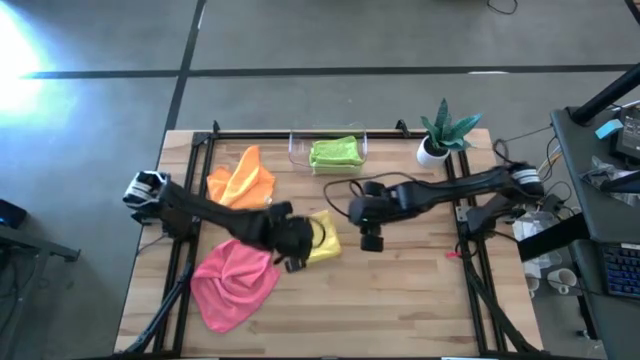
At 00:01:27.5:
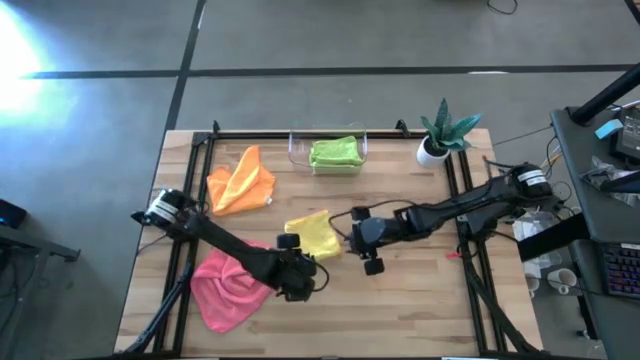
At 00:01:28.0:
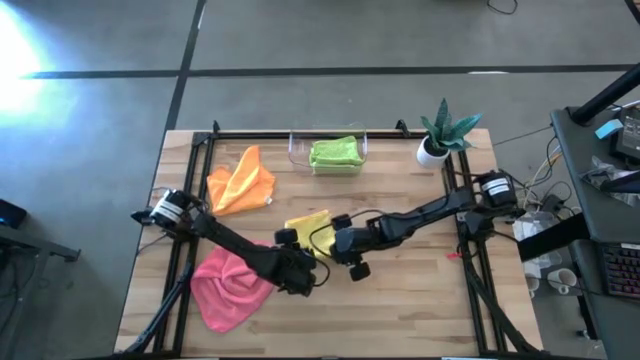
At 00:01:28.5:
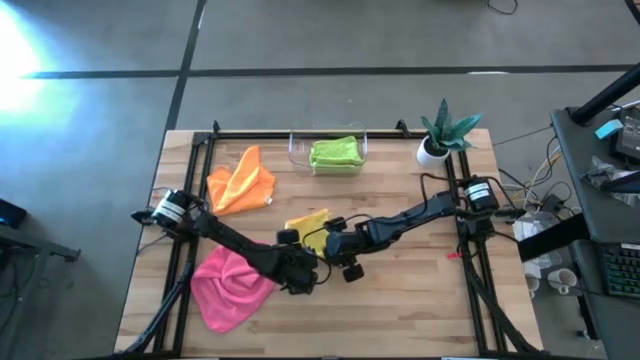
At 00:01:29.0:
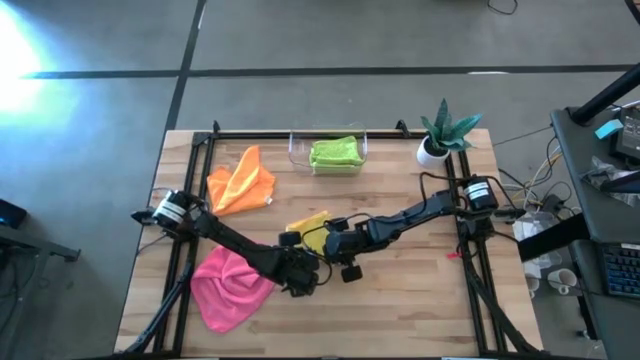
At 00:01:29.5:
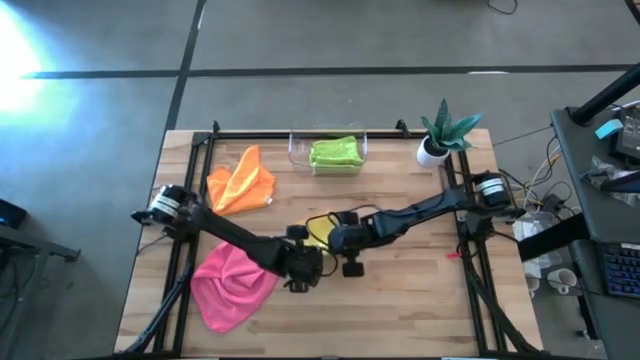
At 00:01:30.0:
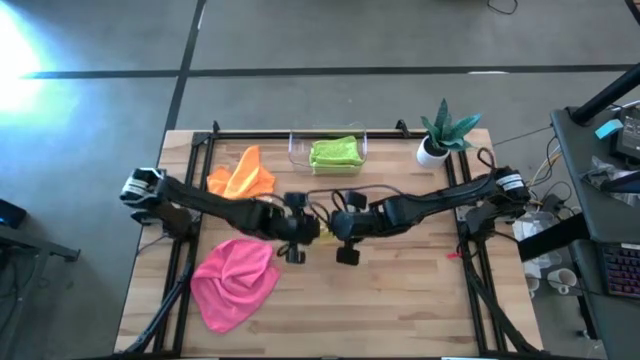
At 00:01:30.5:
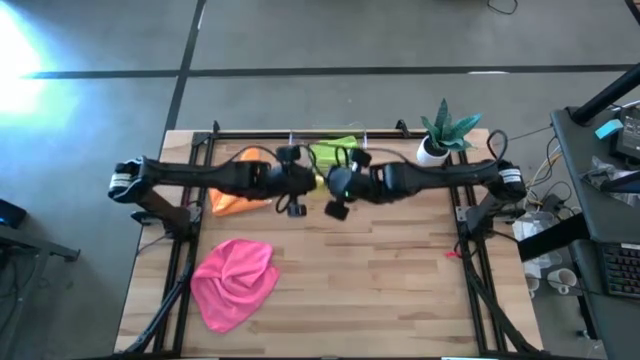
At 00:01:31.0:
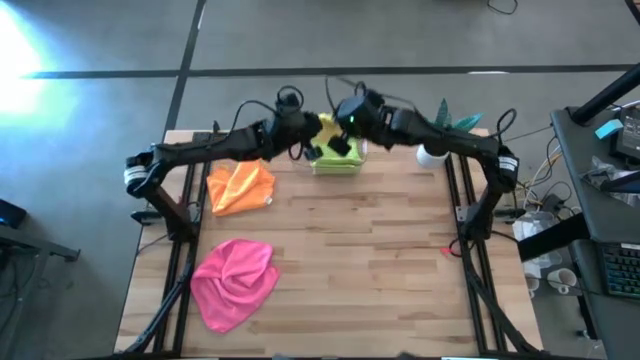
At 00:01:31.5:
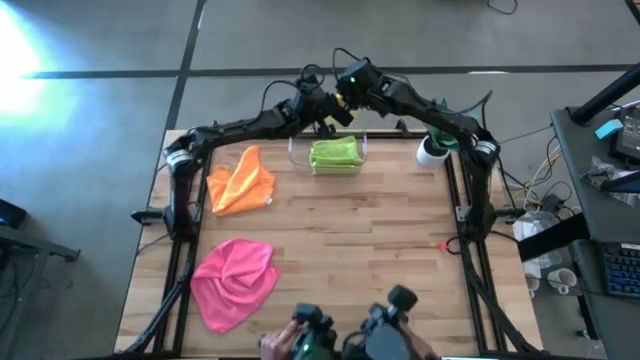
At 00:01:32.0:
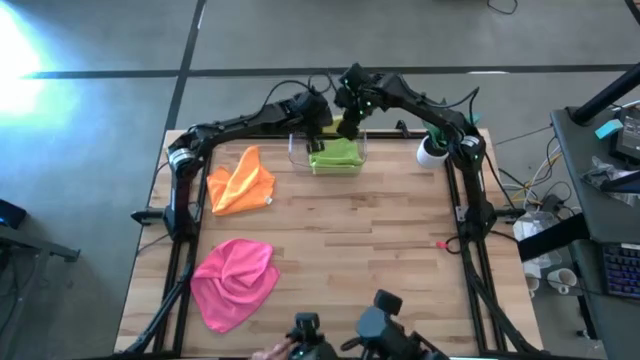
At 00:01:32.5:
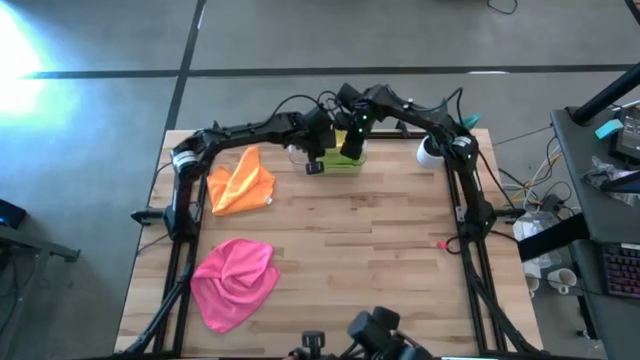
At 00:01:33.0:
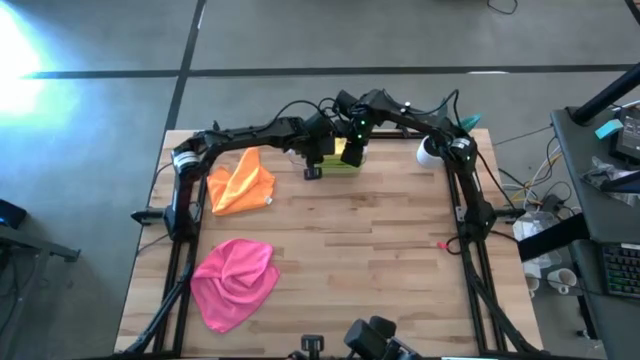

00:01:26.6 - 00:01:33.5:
Task: Fold microfiber towels
Stack the yellow microfiber towel on top of the green microfiber towel into the transparent bin

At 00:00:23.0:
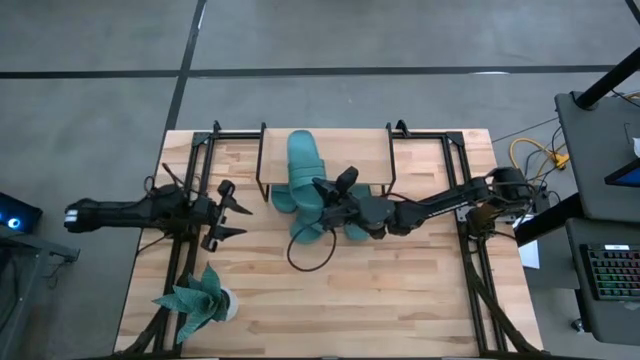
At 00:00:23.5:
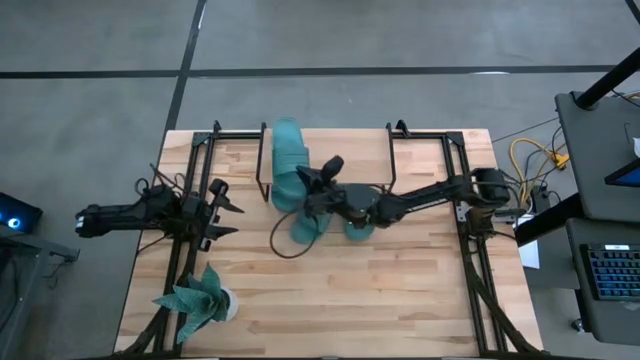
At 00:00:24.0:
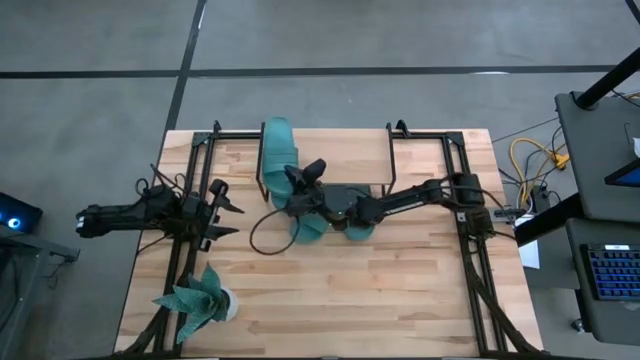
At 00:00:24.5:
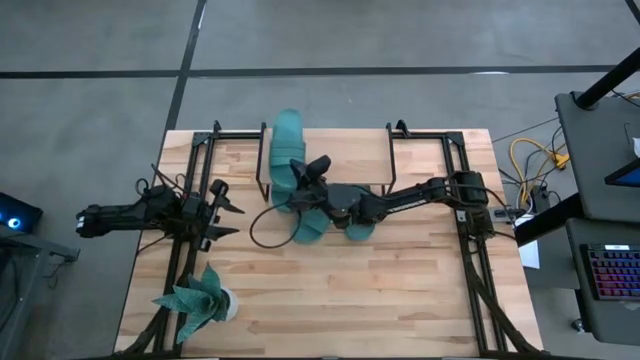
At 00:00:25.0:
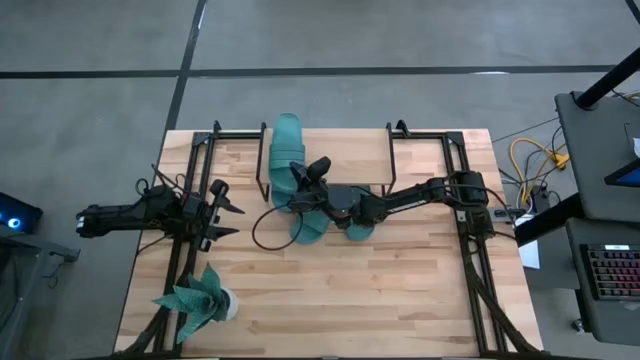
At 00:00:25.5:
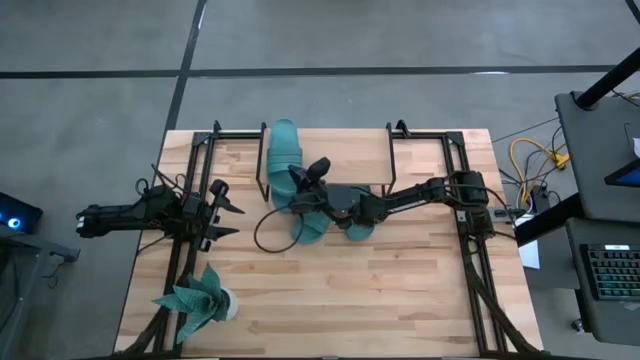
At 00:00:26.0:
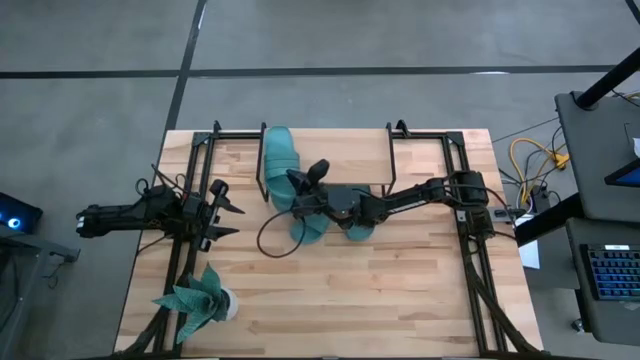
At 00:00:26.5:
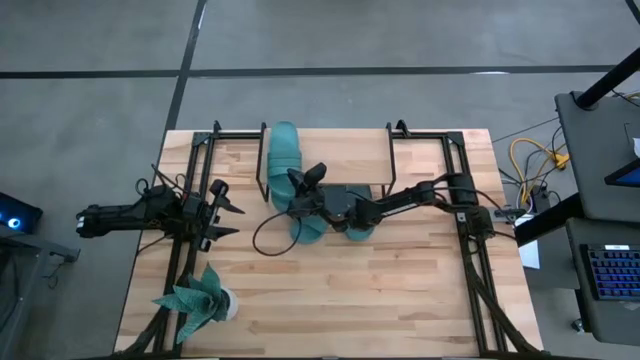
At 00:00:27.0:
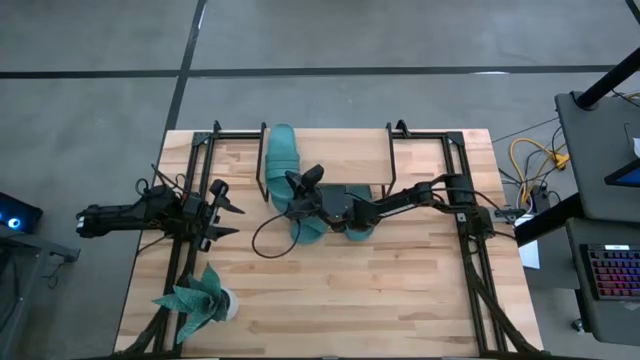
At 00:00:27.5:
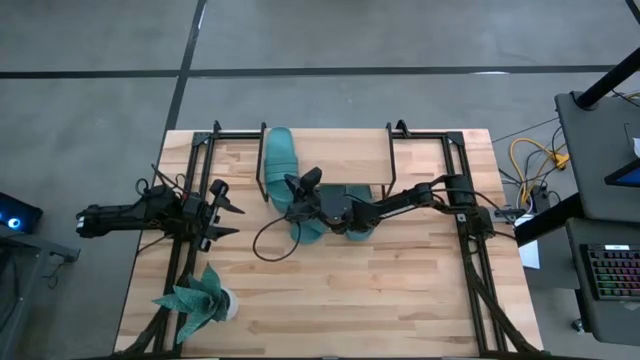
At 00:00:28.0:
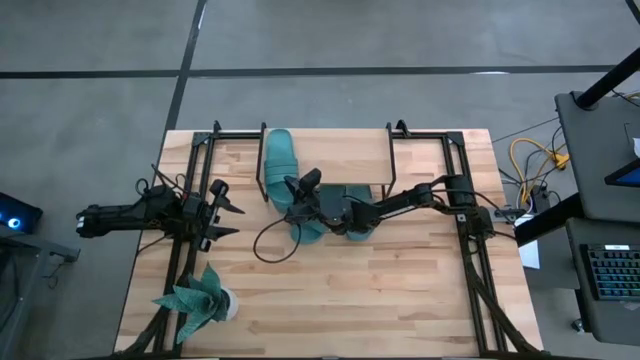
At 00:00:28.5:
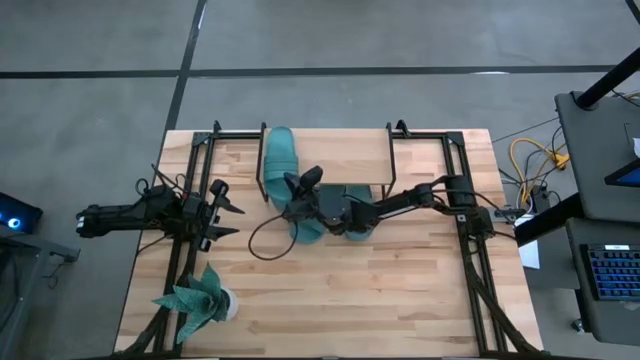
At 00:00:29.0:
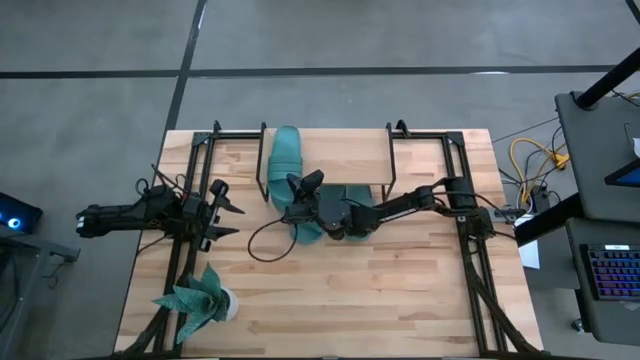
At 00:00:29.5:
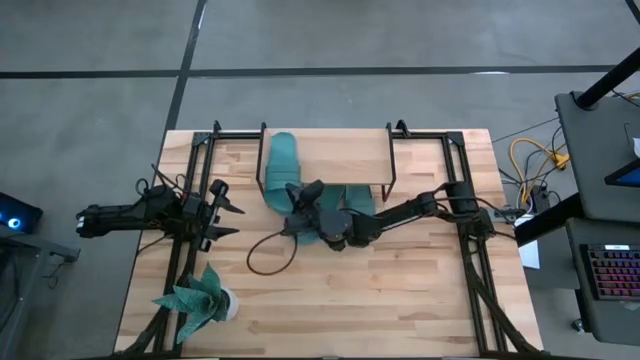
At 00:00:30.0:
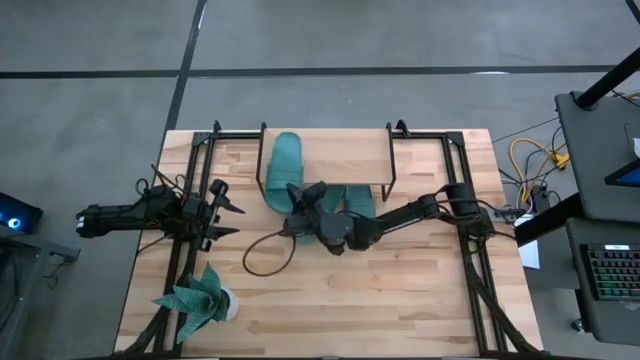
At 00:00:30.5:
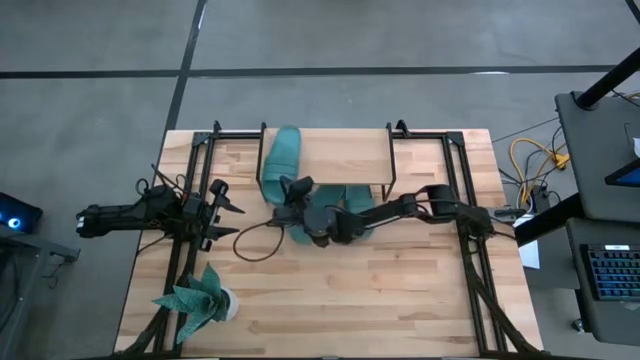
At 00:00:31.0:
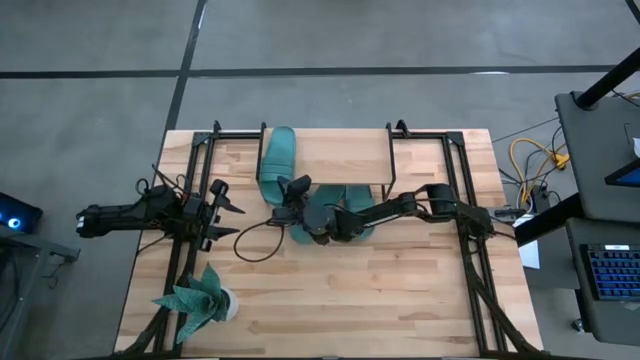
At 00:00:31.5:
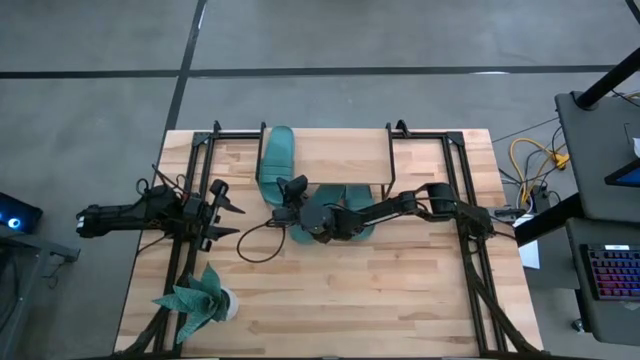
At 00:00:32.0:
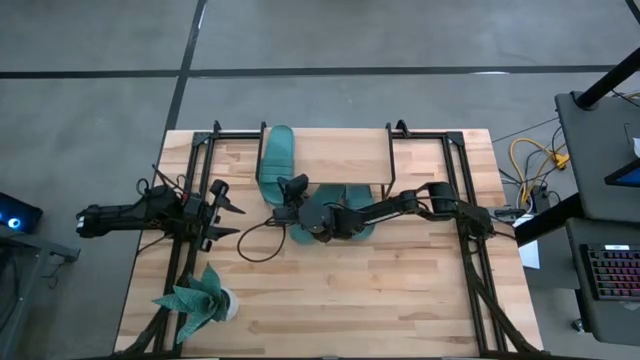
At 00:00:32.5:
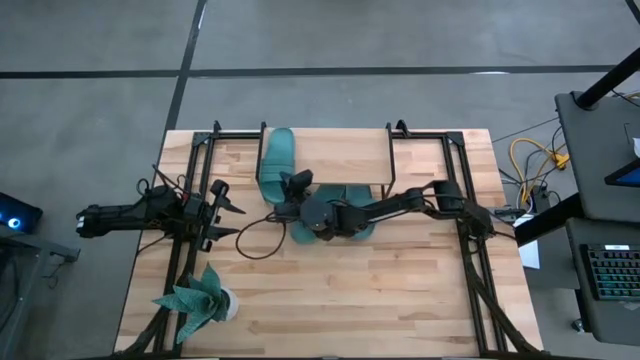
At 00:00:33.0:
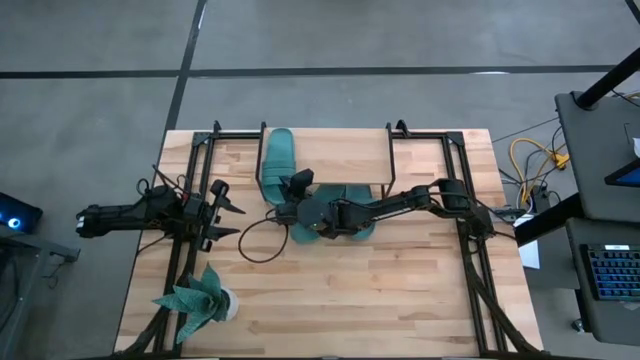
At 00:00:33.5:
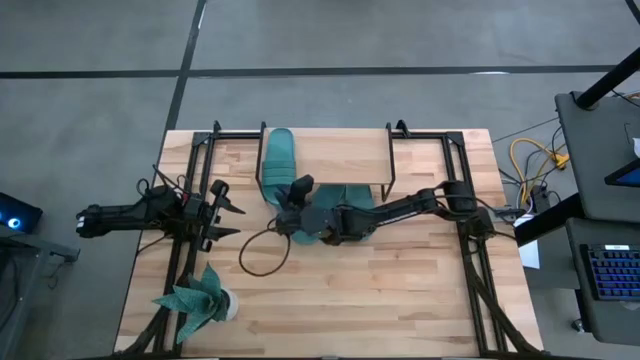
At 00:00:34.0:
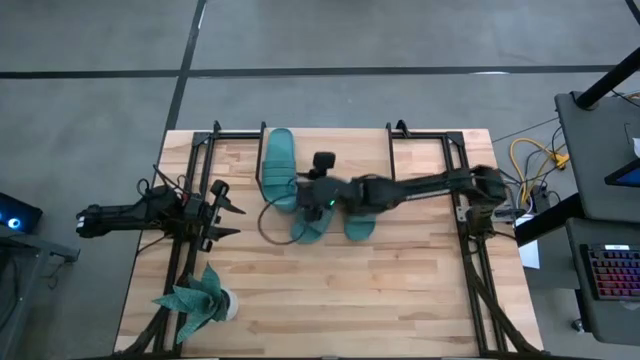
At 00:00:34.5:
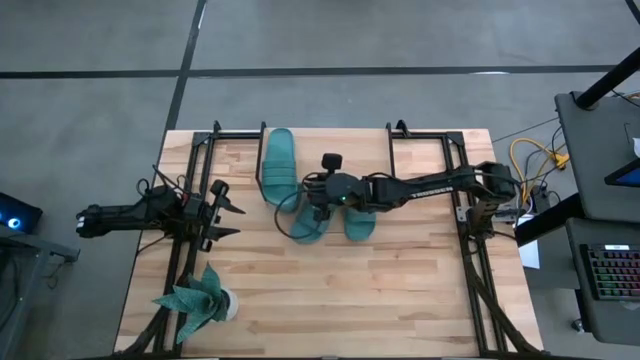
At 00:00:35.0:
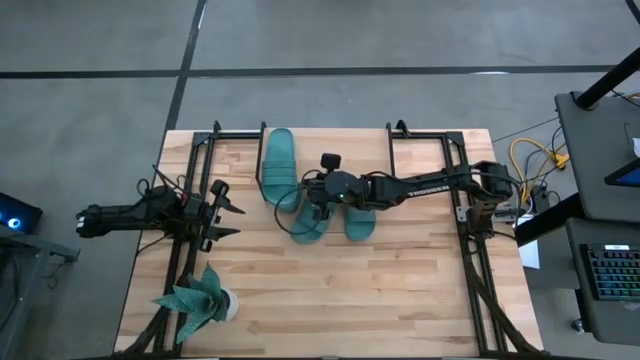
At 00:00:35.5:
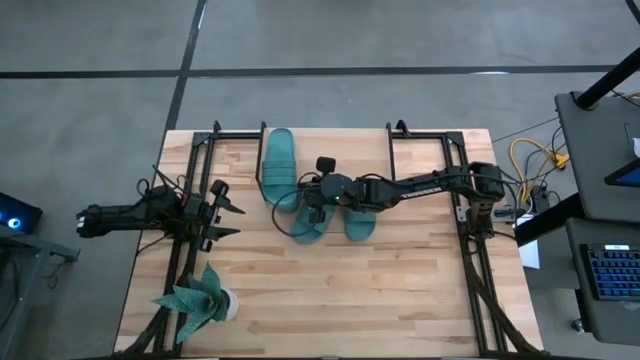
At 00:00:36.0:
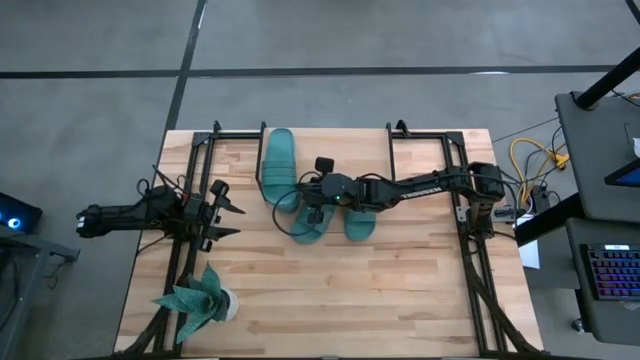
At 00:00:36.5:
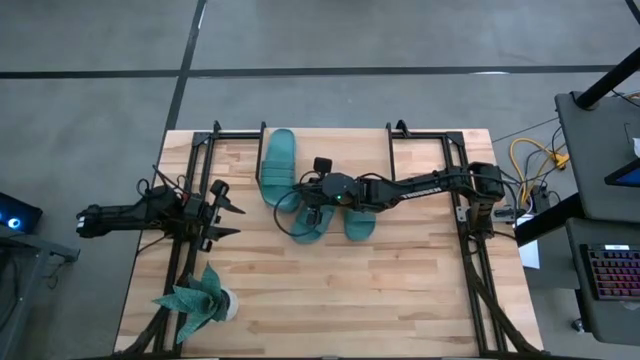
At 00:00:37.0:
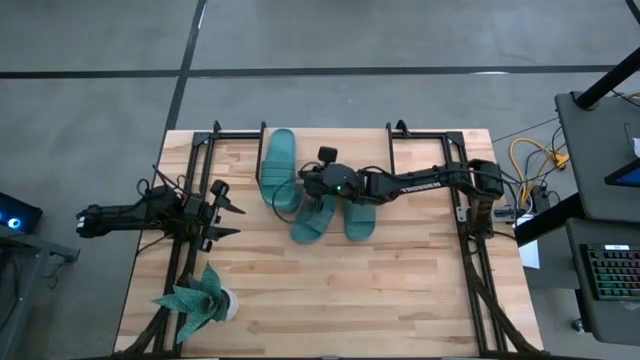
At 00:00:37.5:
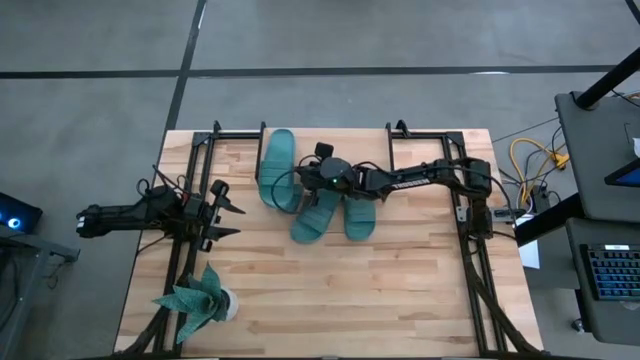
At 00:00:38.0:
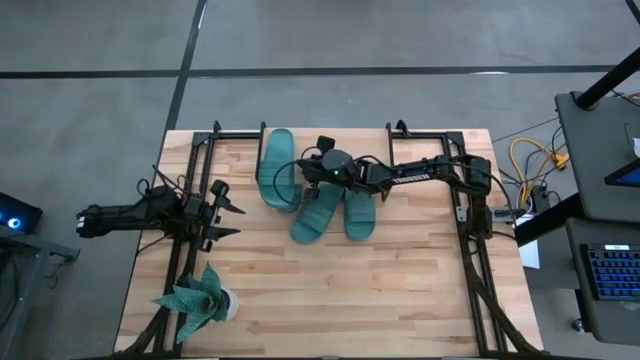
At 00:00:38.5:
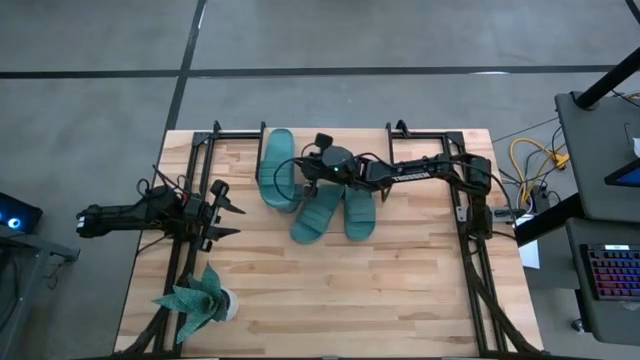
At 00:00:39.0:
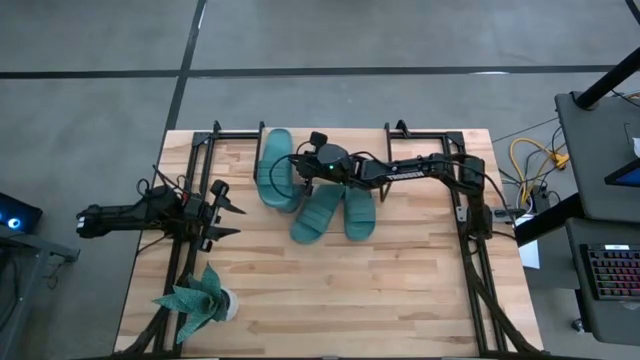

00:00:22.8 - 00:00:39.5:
Task: Pick and place slides into the shelf
Put the blue slipper on the shelf
